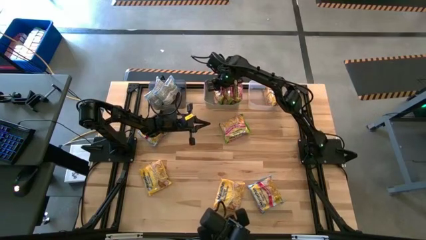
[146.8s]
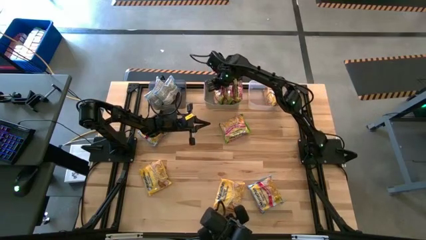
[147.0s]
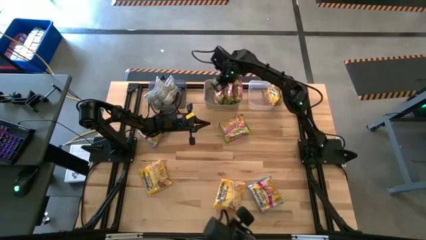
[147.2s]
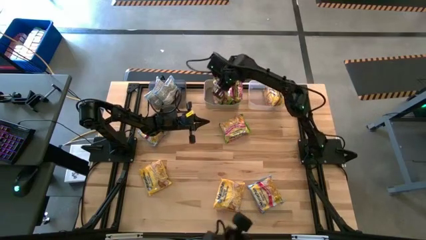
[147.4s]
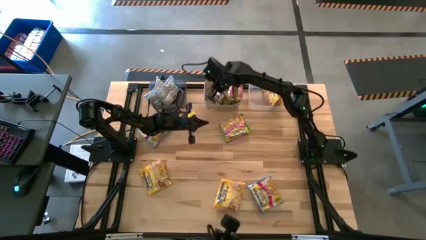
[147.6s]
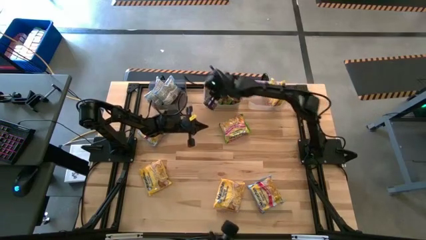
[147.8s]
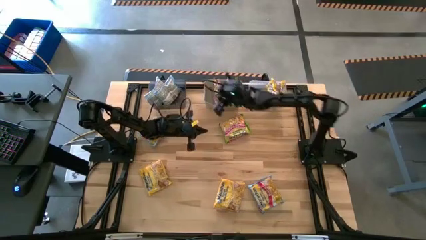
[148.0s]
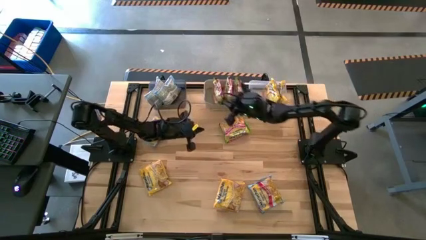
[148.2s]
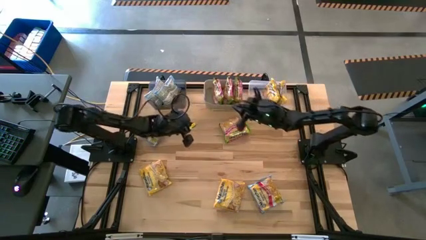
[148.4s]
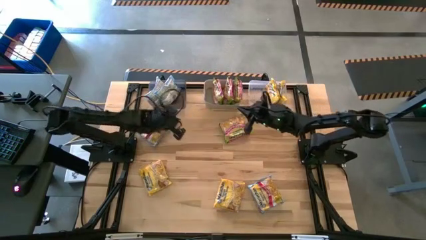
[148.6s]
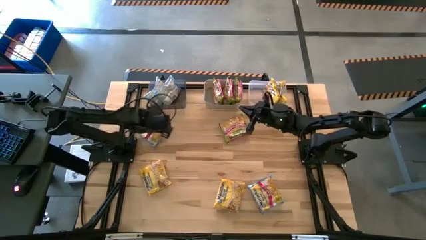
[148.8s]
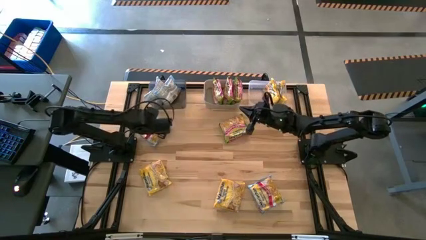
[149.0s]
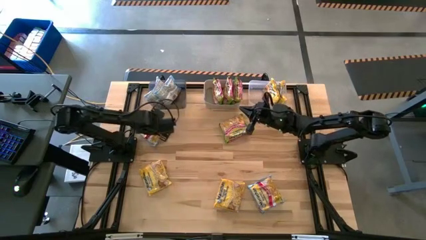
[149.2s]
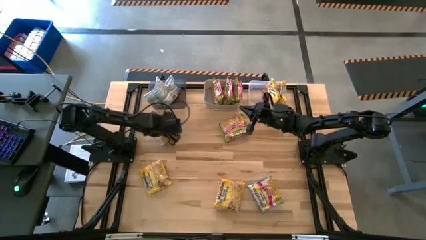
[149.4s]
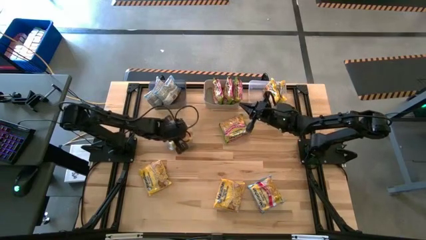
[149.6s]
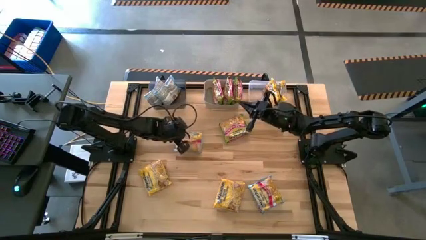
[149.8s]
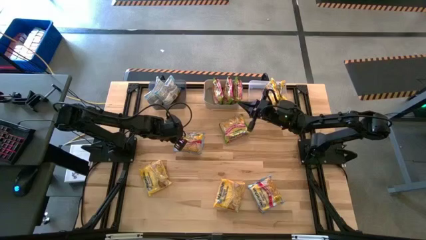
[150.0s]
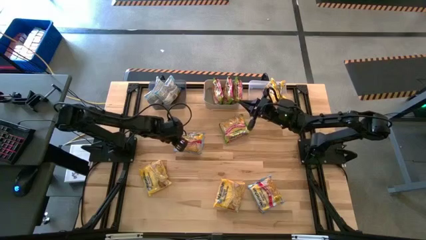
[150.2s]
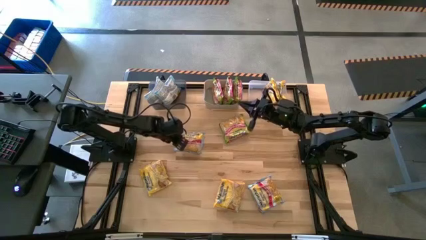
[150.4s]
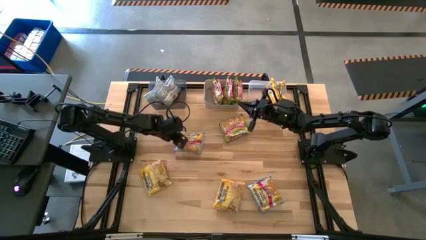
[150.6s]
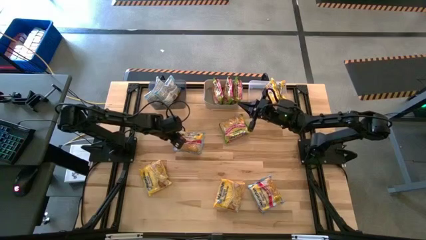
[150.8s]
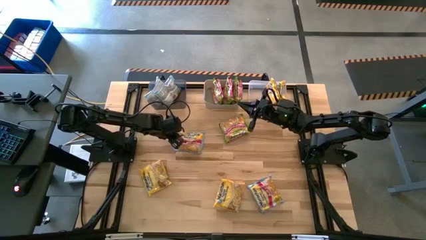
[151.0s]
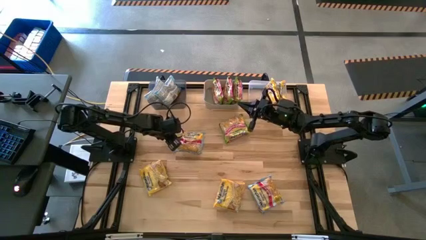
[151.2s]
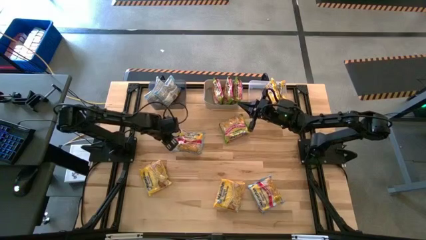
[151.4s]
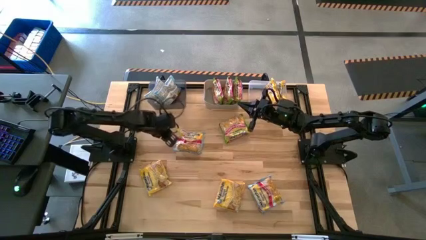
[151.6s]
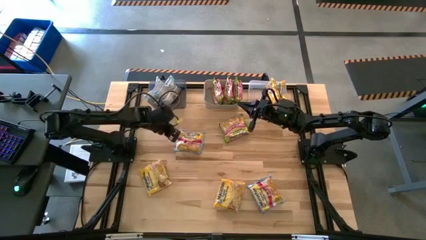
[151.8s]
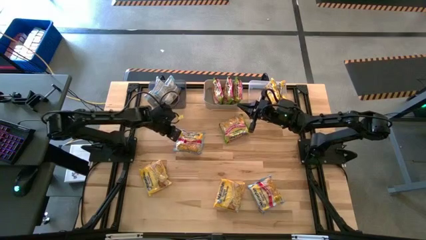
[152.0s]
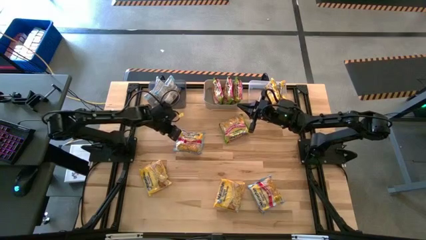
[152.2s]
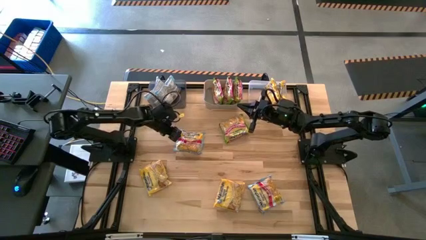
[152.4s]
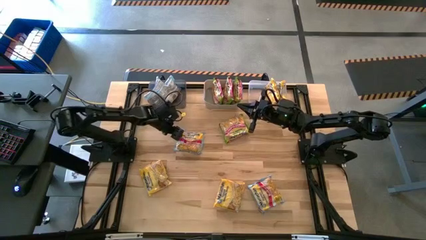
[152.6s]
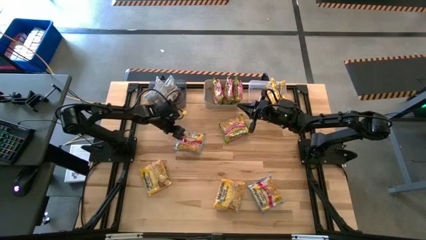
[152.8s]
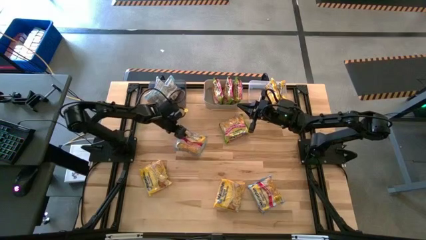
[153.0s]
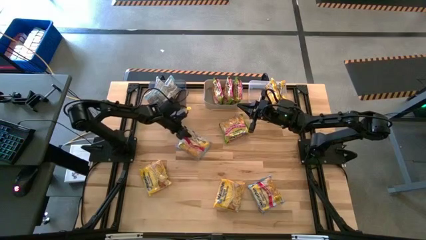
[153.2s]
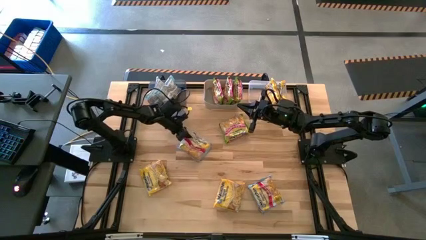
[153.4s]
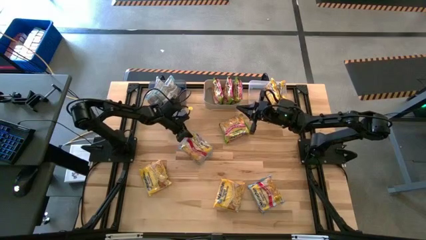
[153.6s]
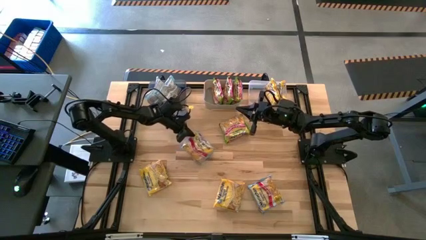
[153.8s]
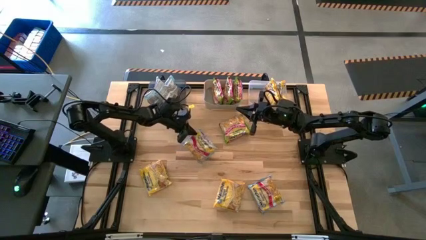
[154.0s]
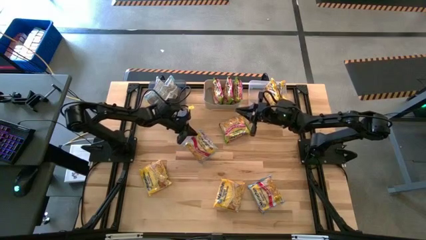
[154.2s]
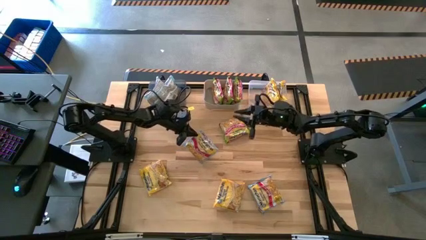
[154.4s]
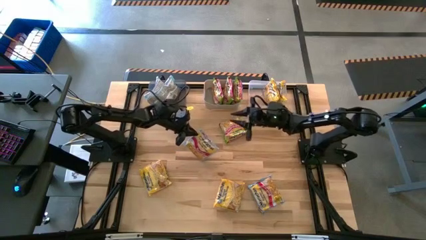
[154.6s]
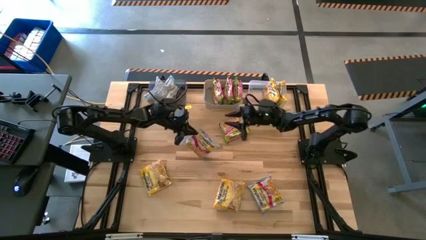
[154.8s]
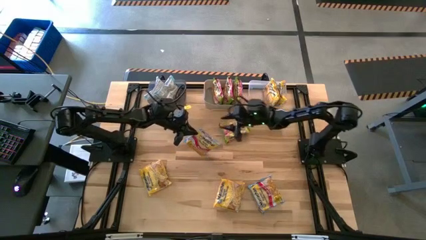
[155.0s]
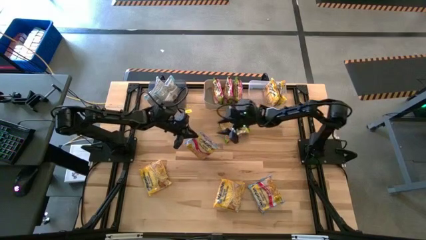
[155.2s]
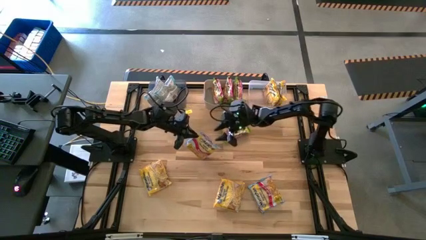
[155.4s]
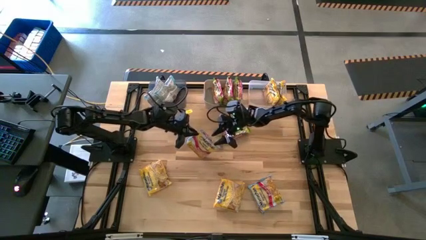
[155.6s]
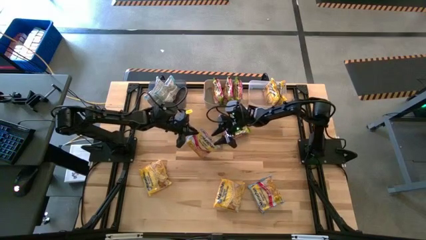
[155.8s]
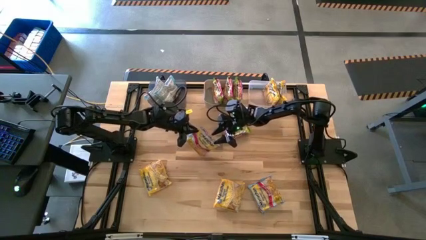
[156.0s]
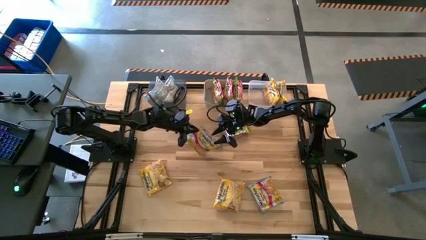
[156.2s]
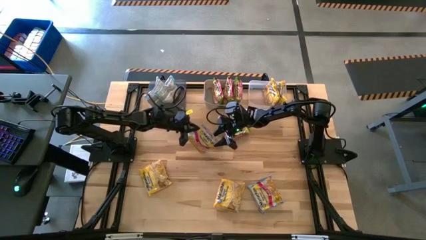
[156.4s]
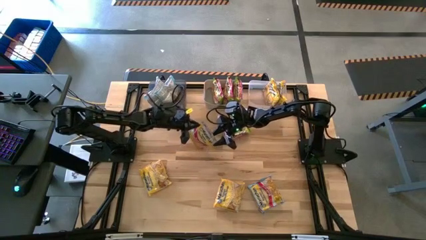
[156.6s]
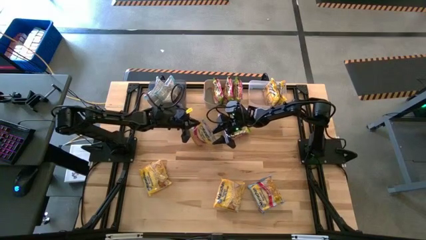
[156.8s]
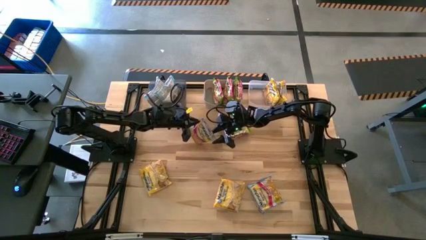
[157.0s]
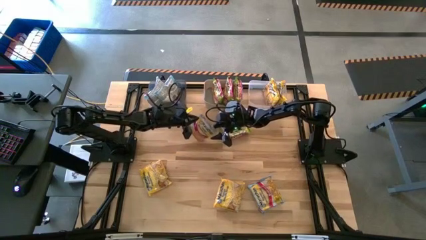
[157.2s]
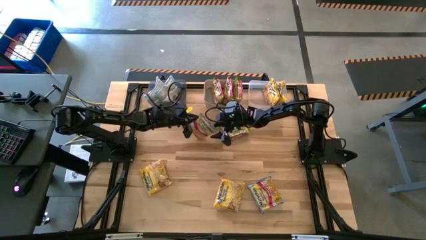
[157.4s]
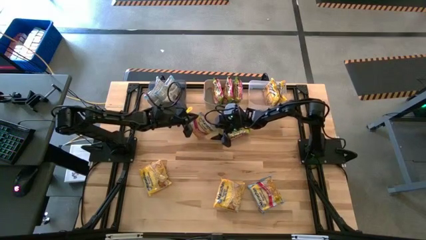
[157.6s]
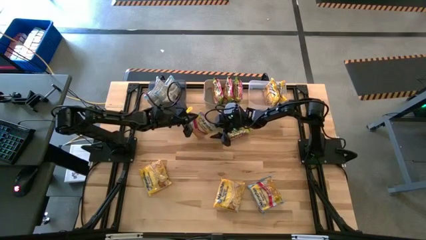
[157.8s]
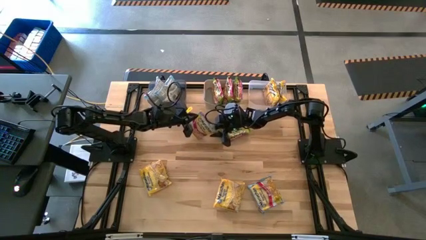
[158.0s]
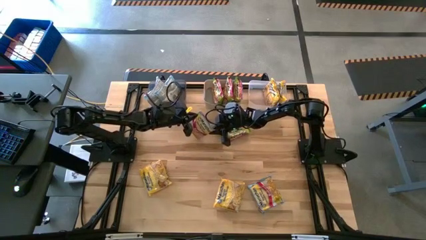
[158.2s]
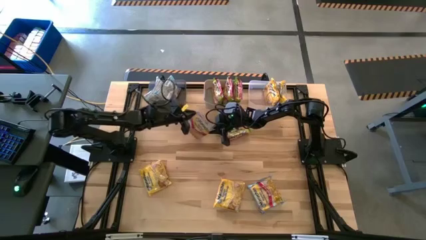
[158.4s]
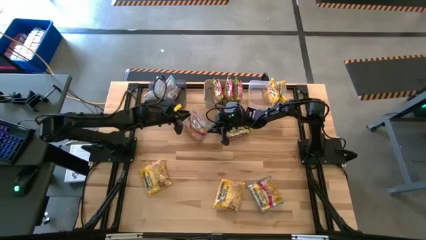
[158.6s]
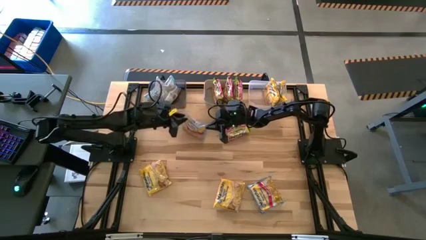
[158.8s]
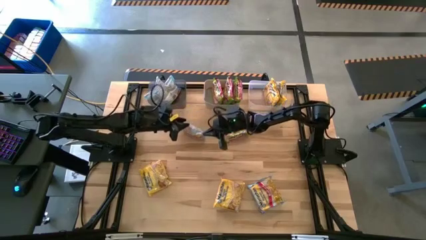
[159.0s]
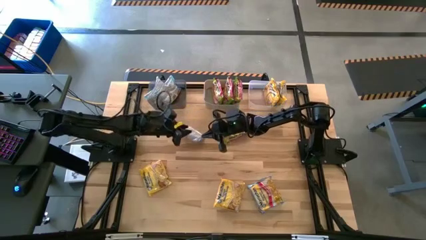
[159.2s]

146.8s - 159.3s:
Task: Sort Maruchan noodles
Put the top blue noodle pack into the black bin

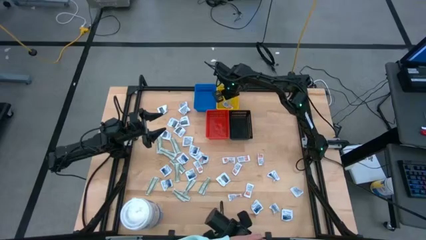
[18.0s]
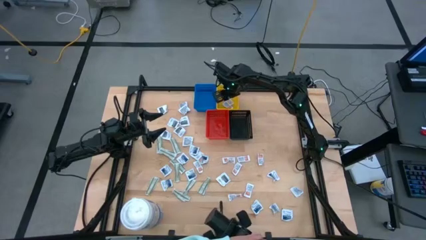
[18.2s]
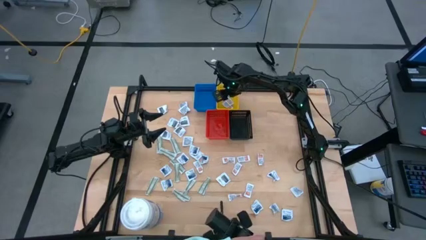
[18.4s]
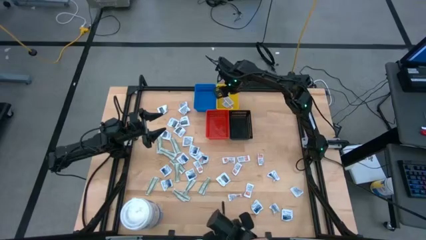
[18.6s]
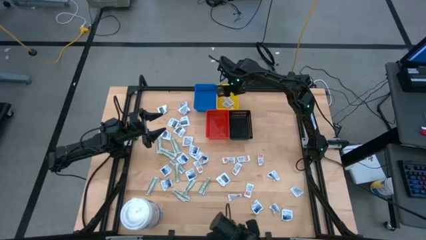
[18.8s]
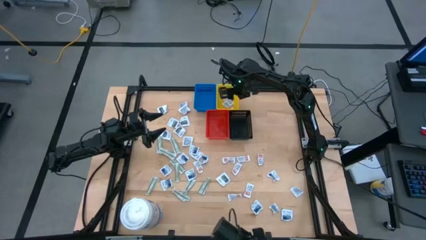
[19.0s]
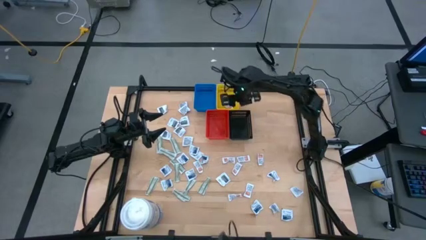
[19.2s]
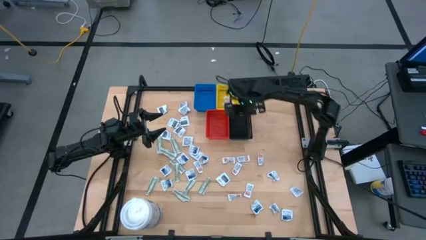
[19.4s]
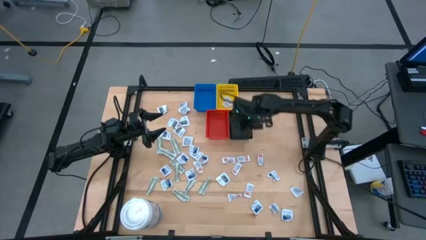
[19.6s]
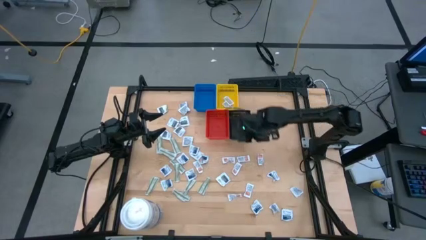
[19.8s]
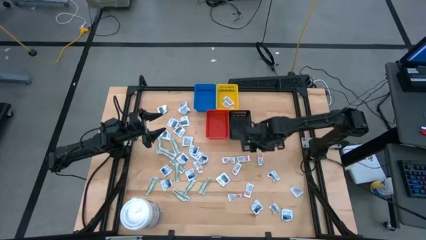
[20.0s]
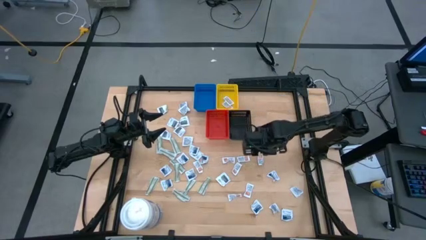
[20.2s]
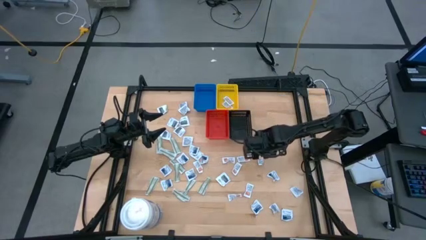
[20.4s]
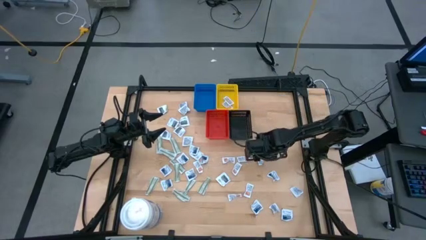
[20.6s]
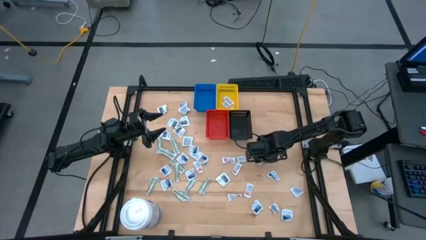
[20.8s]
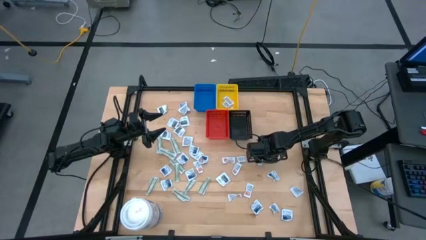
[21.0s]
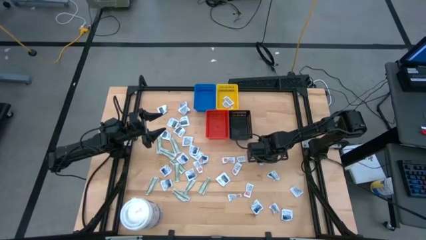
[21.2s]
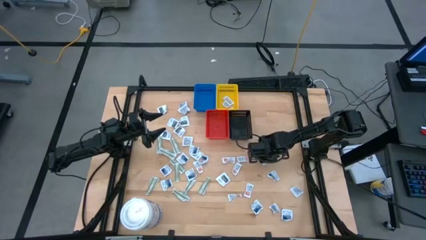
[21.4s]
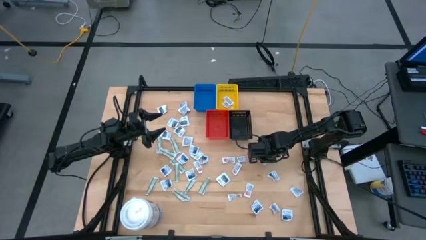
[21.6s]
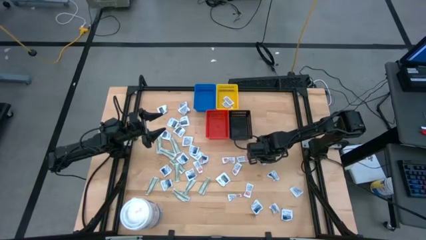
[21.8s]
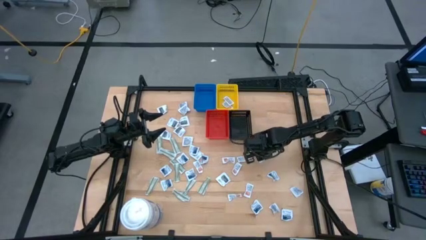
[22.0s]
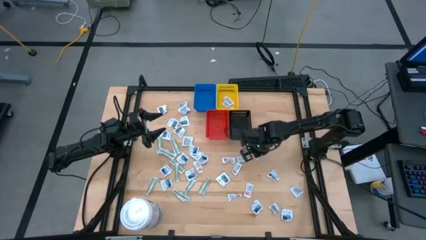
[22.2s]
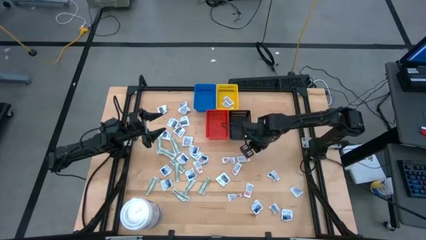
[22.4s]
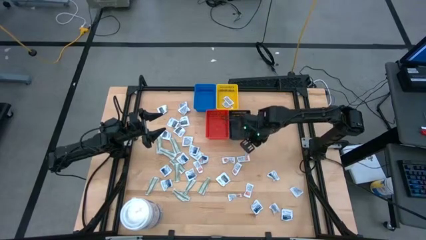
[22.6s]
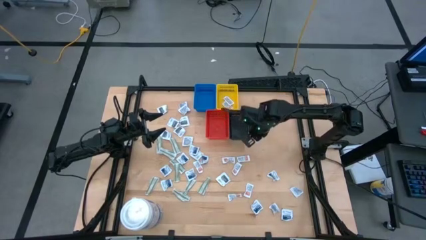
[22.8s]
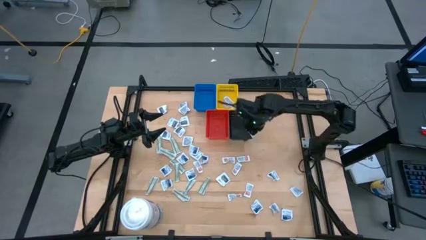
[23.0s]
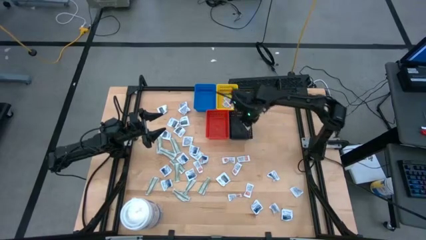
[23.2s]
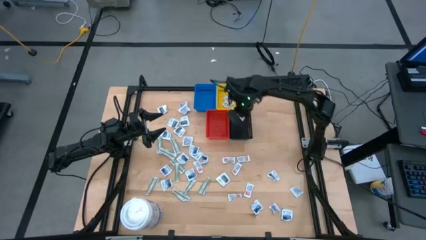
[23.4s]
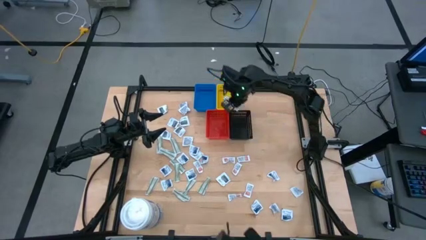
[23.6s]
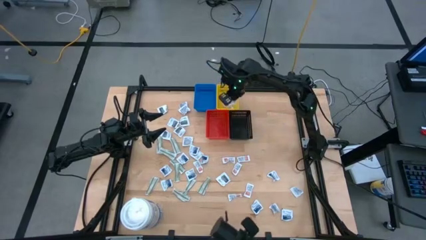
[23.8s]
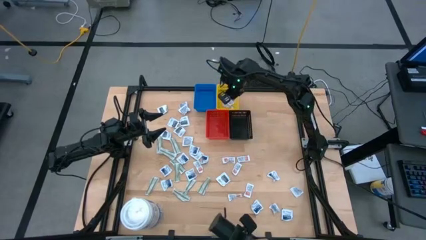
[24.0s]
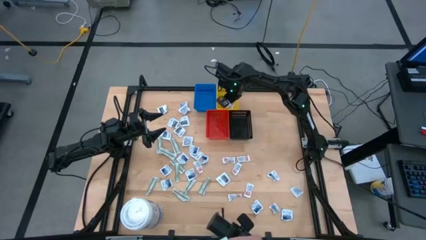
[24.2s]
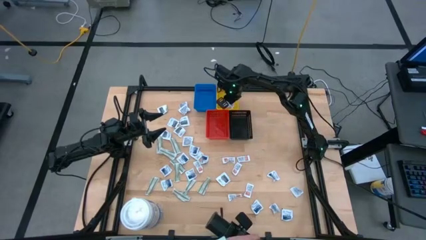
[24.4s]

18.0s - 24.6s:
Task: Pick & Place First Aid Supplies
Put the ointment pack into the yellow bin
